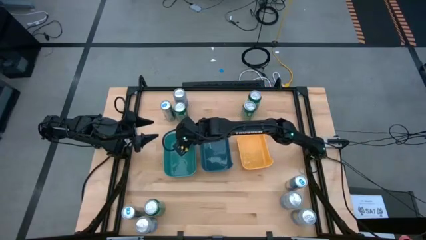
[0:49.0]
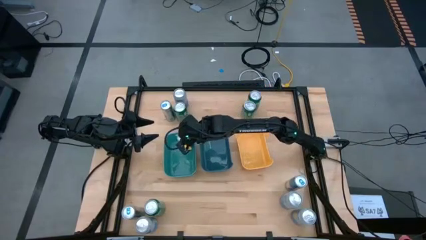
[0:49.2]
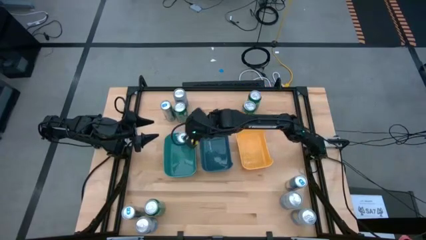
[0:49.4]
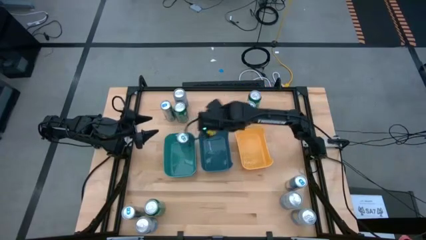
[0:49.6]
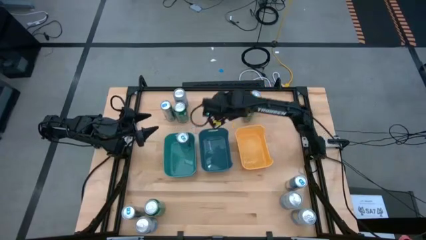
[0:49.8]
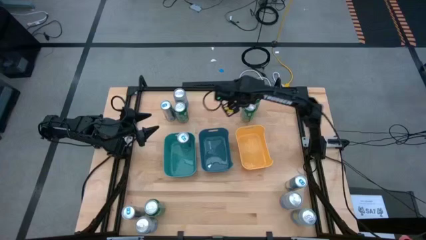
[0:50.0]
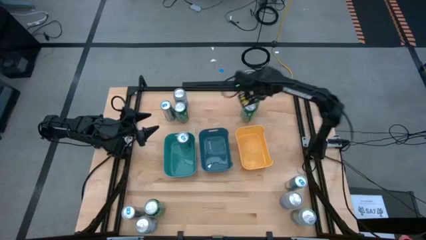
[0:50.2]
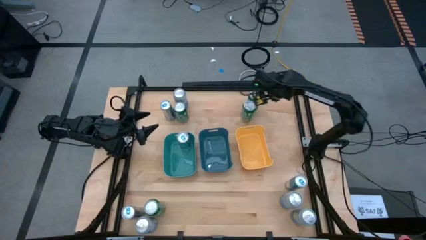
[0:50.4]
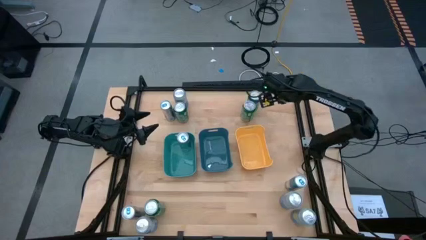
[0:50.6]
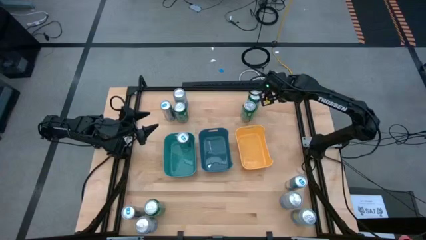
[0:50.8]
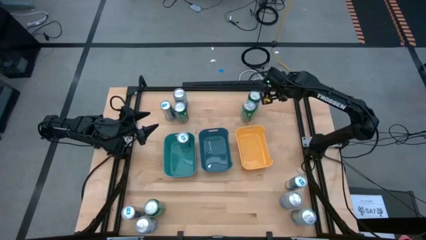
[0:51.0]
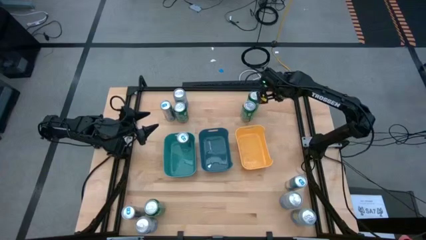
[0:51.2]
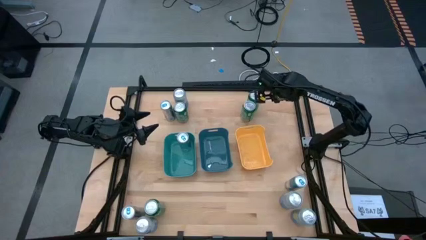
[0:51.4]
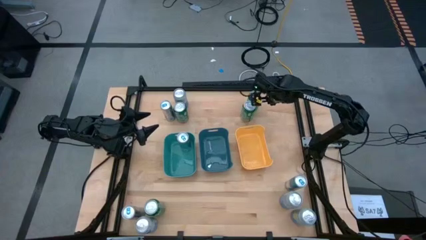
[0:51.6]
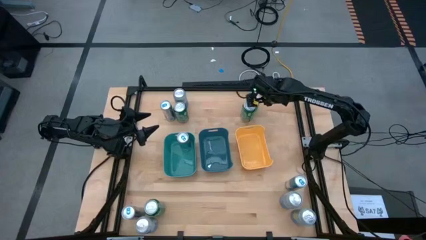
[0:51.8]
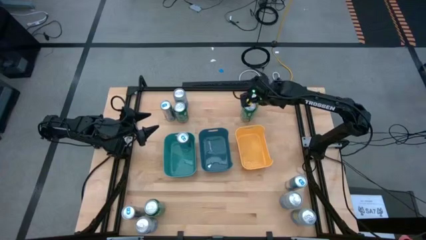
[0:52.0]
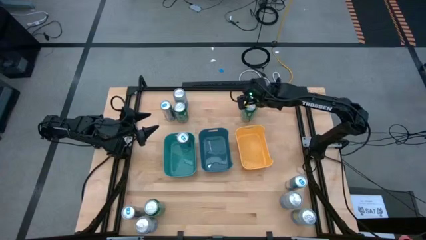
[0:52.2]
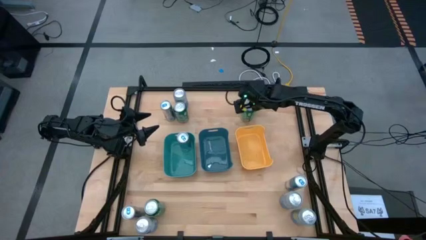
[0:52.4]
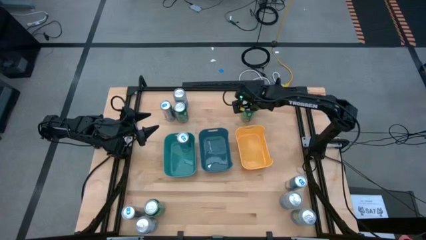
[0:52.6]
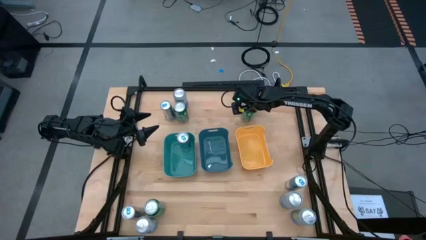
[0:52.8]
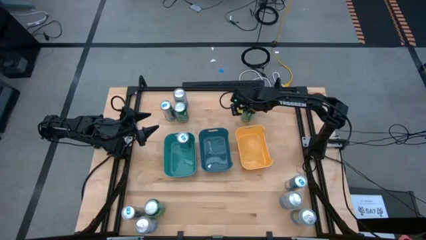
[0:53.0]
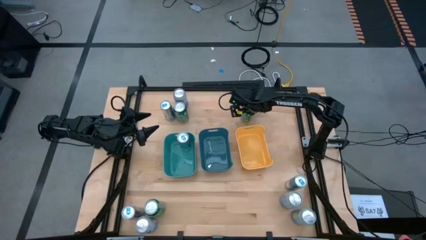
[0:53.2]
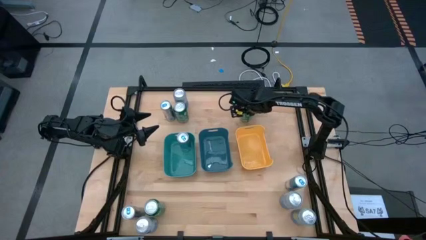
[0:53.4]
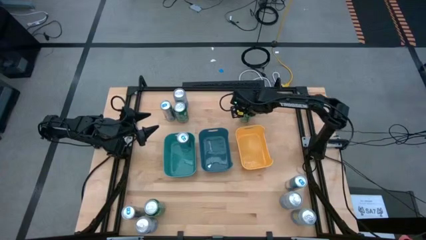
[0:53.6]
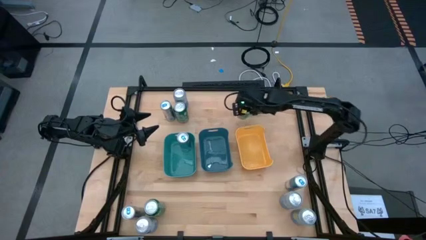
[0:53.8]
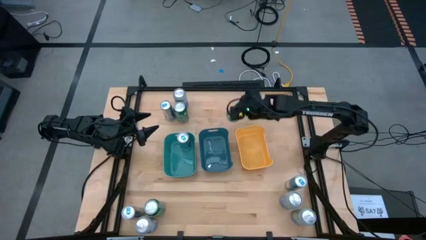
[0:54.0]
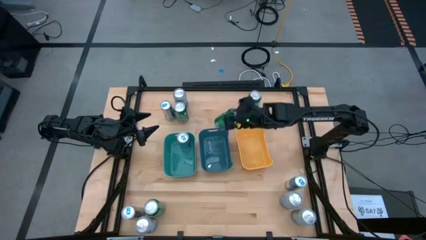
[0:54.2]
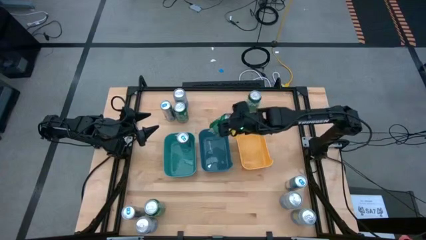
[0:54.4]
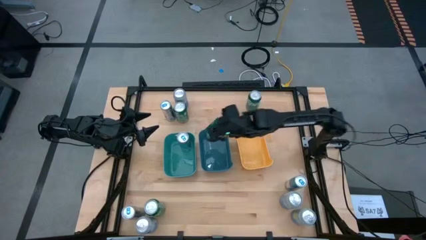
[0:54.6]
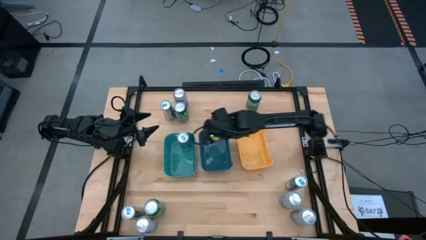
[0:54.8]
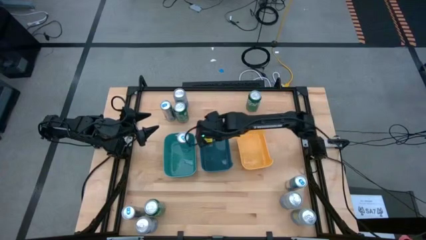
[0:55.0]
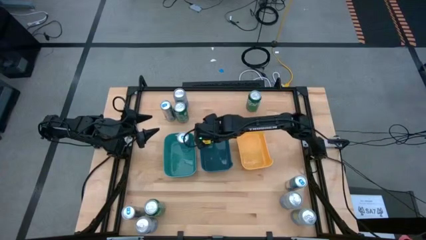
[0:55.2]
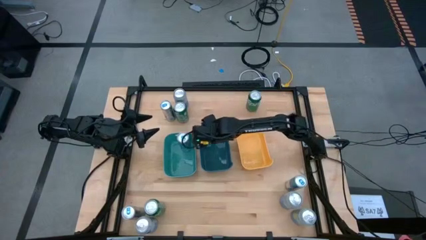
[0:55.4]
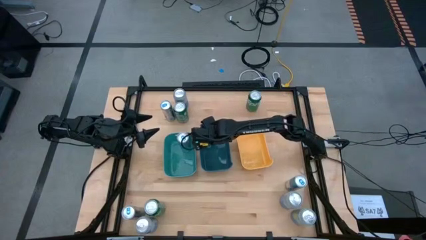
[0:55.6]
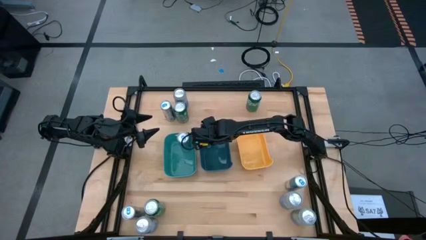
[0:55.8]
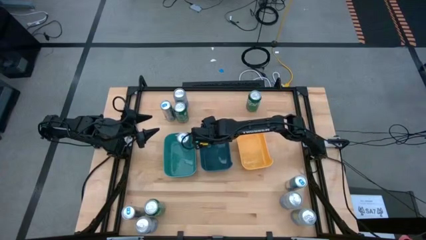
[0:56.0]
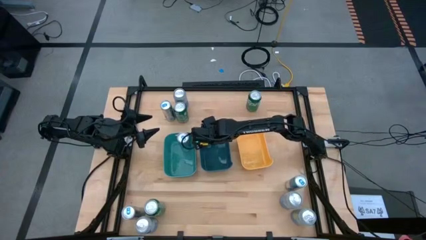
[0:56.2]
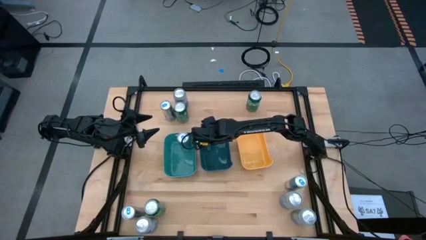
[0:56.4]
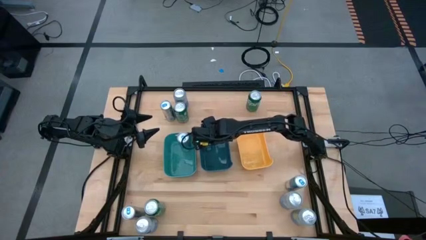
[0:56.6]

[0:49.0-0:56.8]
Task: Sort soda cans
Put the top green soda can into the blue bin

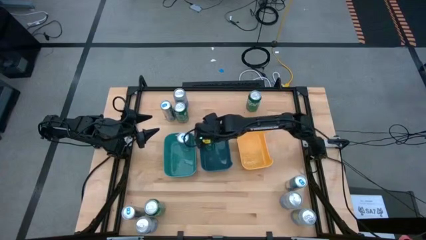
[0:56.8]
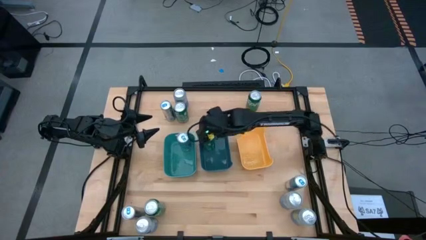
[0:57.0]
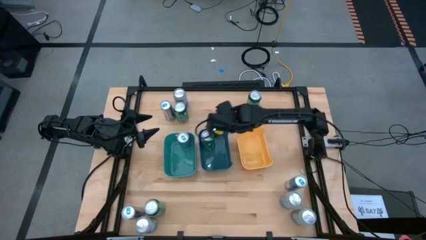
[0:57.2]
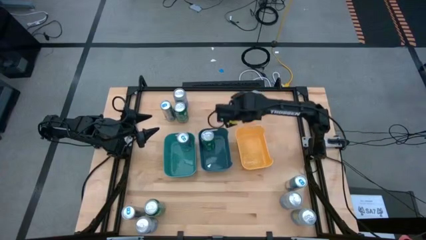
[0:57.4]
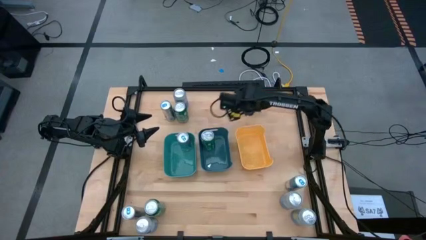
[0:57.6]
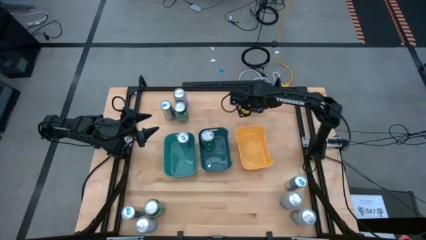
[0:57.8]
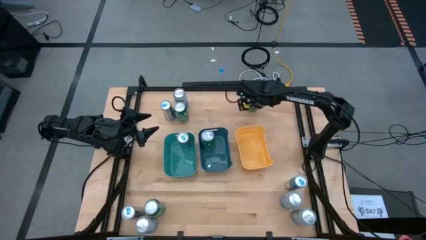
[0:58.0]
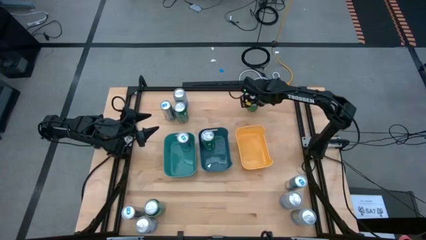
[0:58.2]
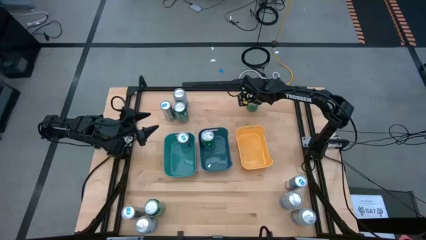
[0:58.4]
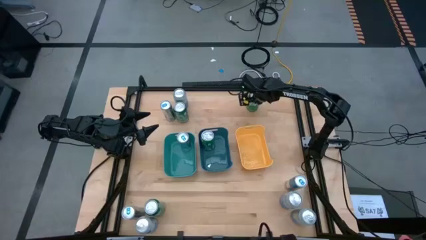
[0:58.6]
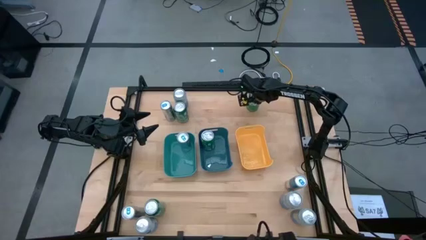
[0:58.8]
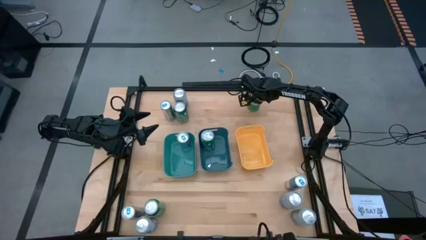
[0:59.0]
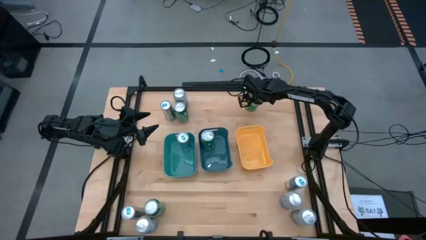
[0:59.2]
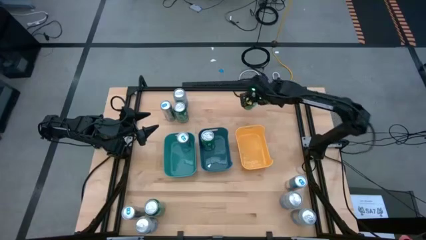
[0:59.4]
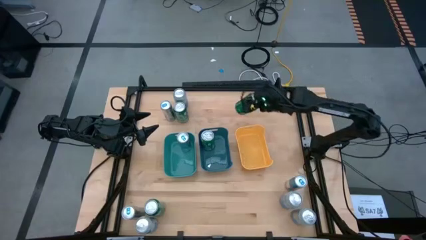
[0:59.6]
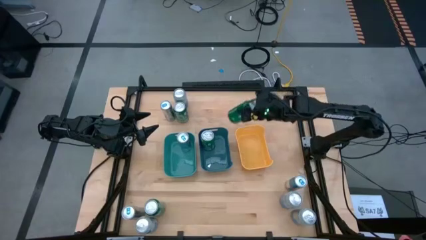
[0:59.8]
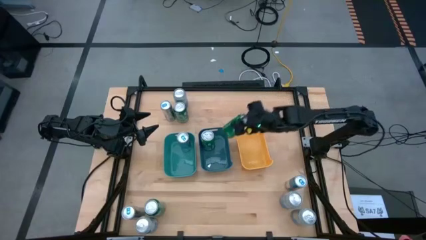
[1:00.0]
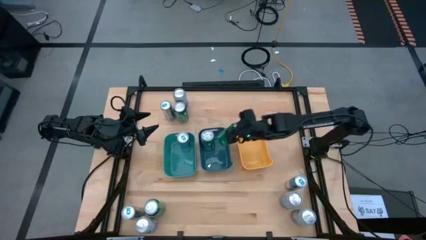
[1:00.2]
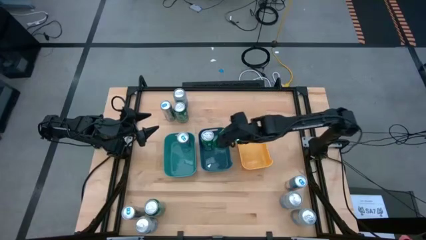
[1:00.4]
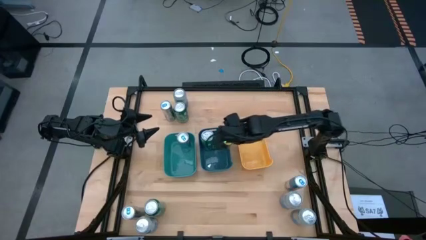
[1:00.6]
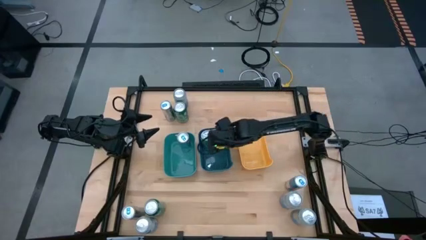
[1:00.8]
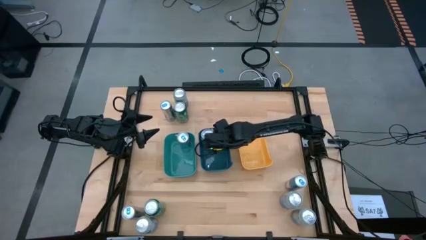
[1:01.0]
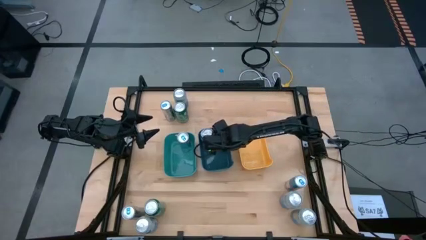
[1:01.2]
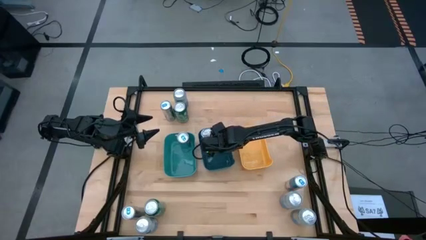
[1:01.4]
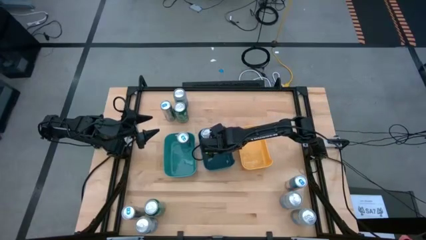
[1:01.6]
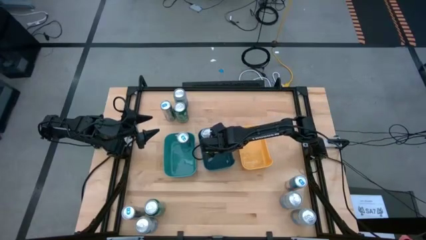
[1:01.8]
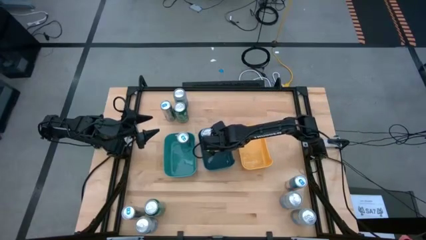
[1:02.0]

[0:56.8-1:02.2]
Put the top right green soda can into the blue bin

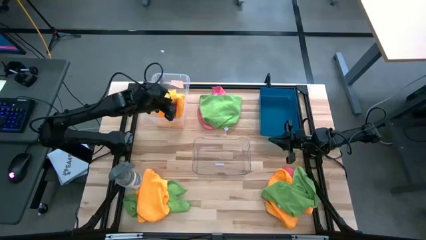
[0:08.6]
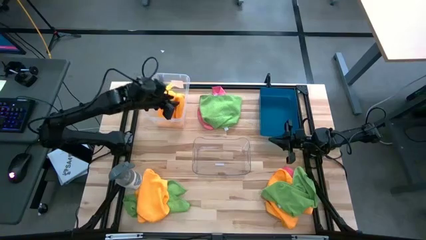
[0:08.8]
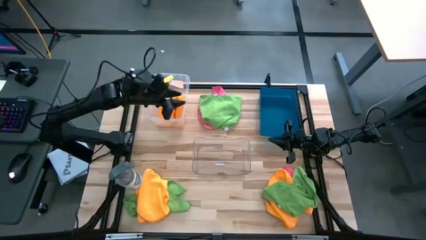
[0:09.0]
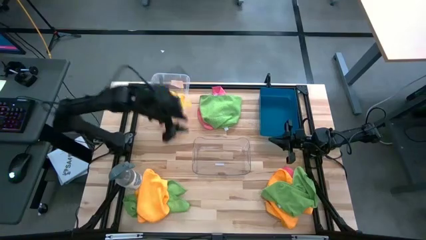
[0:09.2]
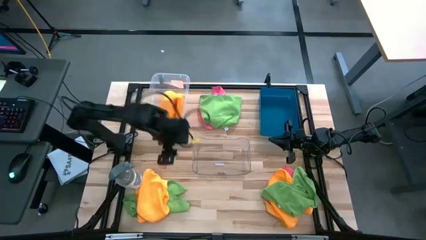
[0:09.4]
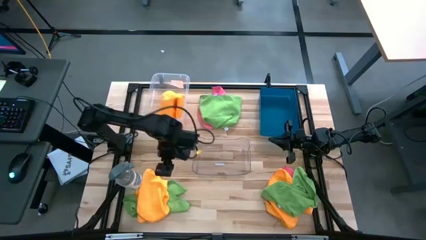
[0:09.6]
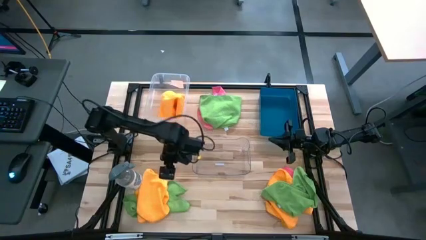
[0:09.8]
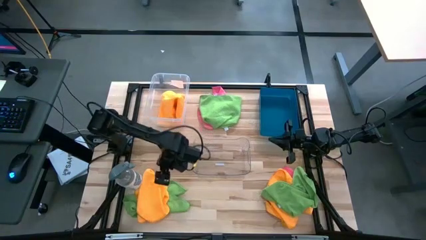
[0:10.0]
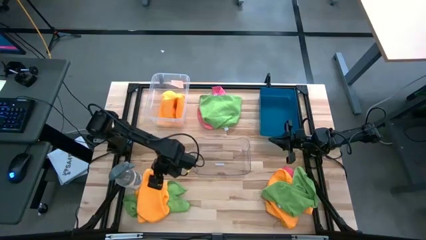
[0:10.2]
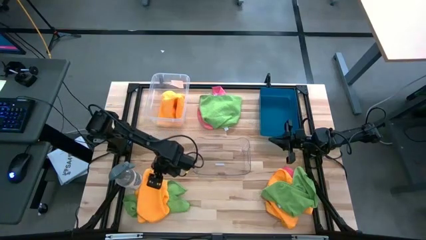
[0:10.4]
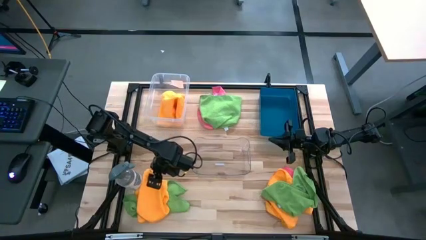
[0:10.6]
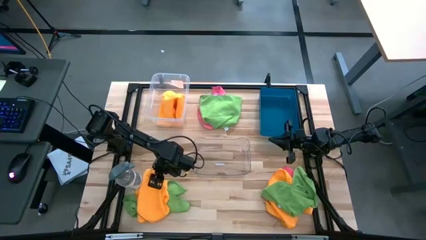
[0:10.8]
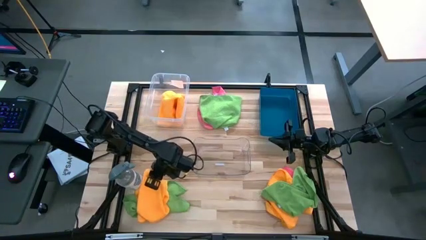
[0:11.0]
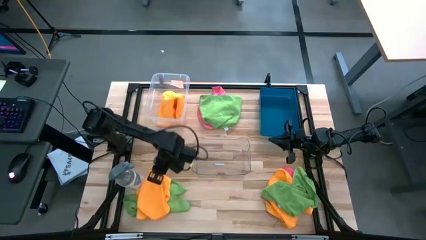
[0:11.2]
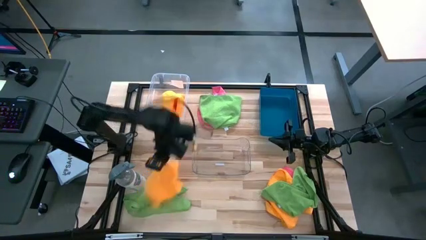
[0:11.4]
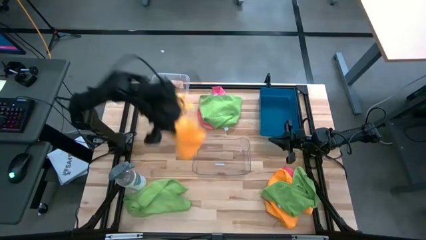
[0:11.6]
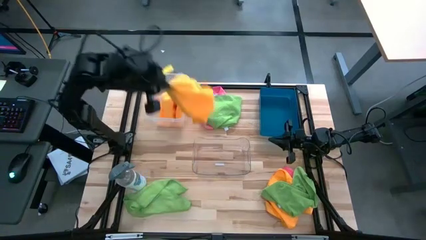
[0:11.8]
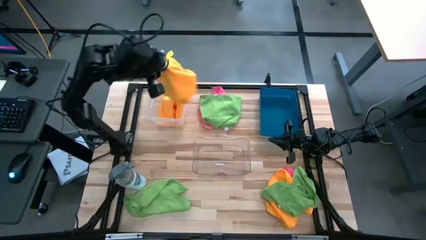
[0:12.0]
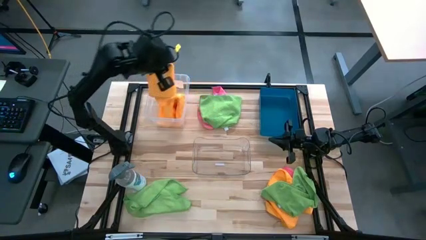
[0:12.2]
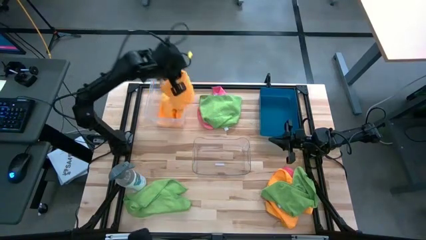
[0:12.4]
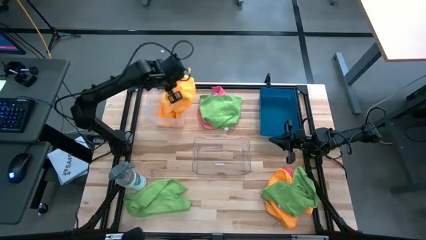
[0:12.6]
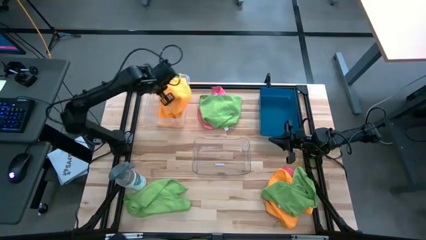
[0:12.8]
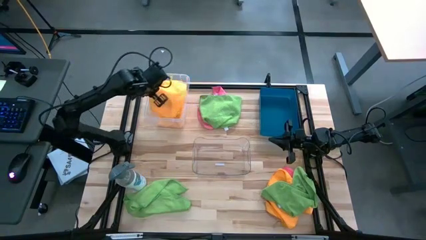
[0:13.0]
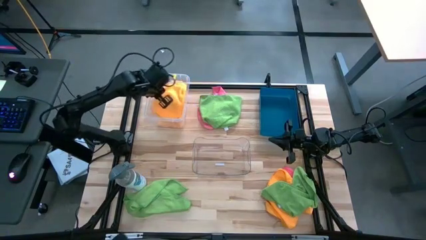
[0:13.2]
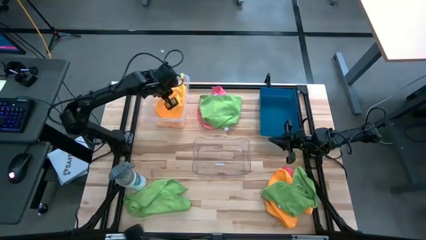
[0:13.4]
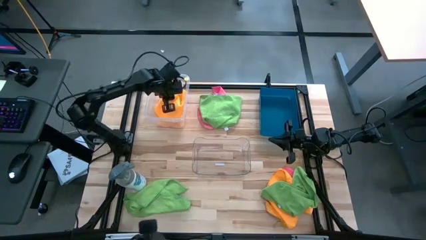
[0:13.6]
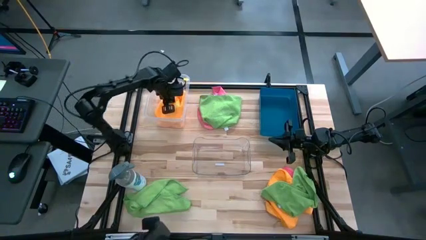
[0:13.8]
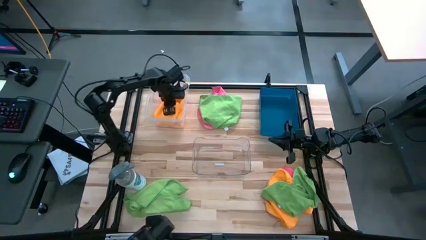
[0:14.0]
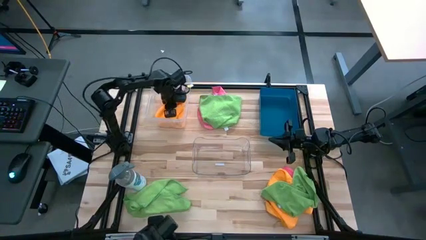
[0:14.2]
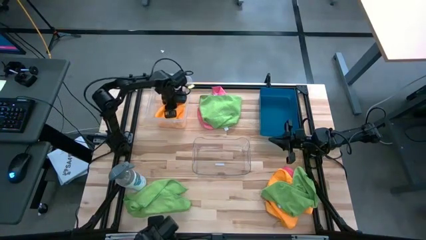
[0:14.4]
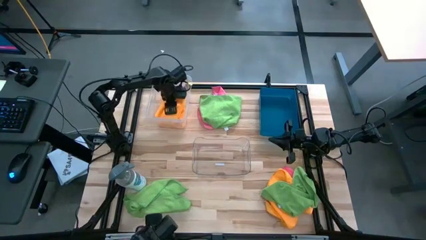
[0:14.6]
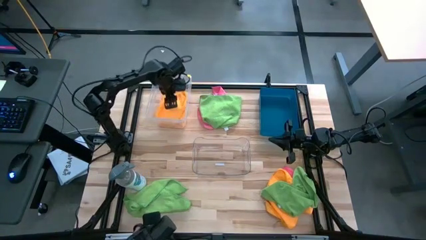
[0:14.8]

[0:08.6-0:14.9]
Task: Sort microfiber towel by color & place in baskets
Put the left orange microfiber cloth into the transparent bin
